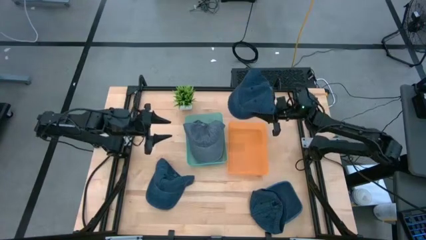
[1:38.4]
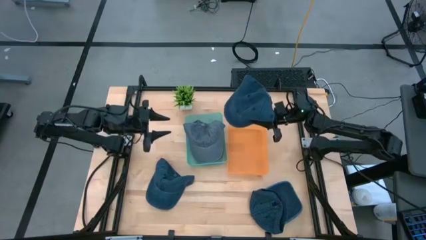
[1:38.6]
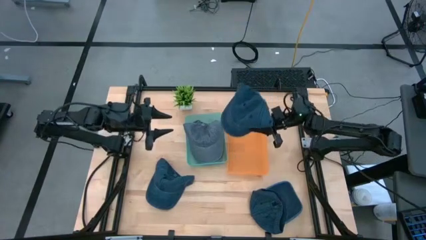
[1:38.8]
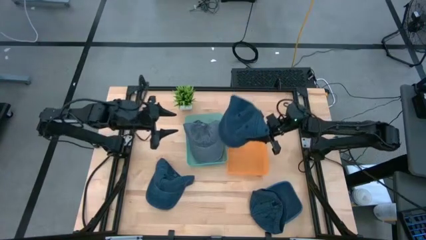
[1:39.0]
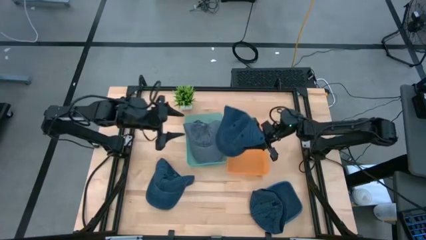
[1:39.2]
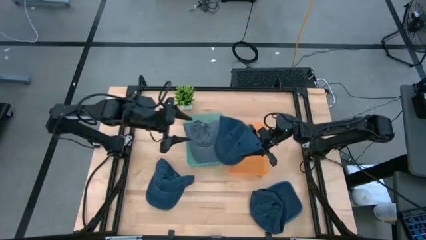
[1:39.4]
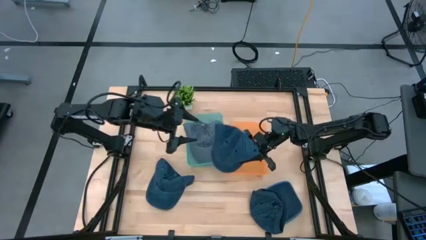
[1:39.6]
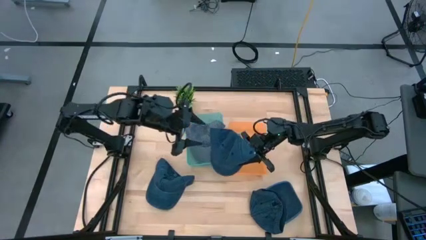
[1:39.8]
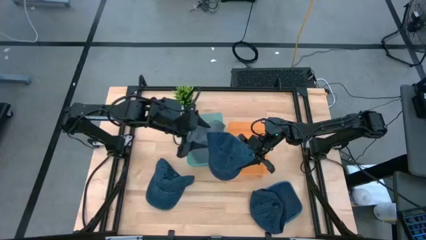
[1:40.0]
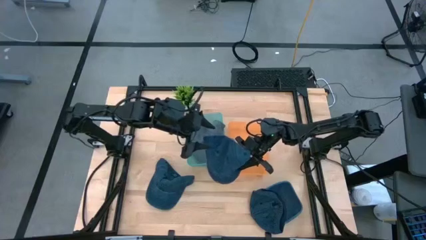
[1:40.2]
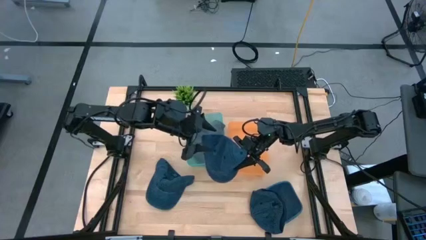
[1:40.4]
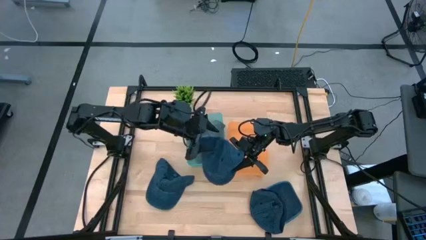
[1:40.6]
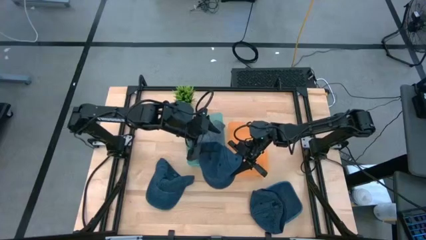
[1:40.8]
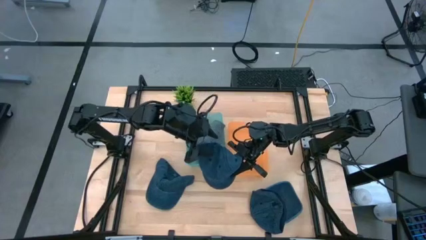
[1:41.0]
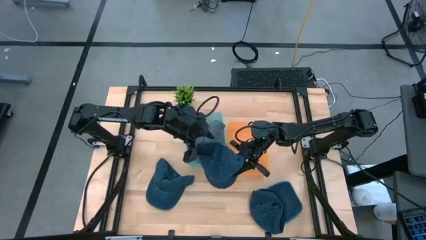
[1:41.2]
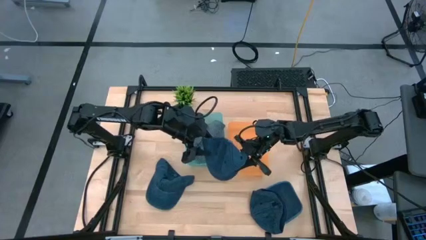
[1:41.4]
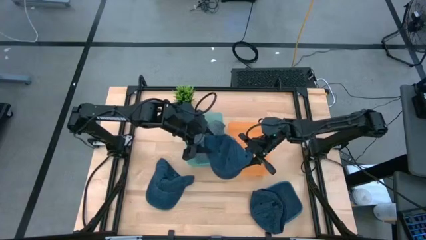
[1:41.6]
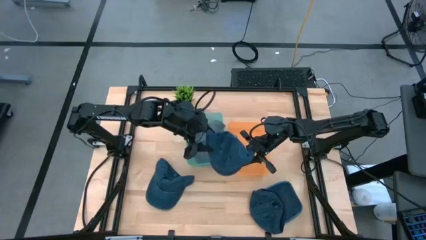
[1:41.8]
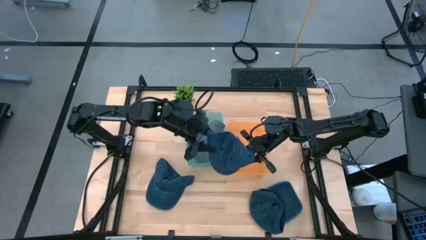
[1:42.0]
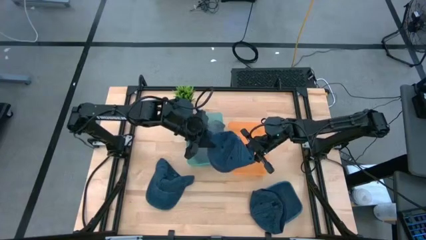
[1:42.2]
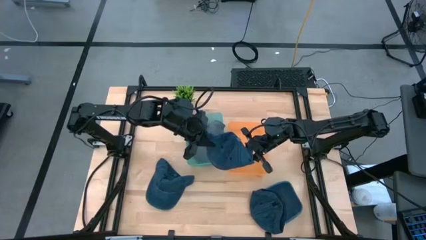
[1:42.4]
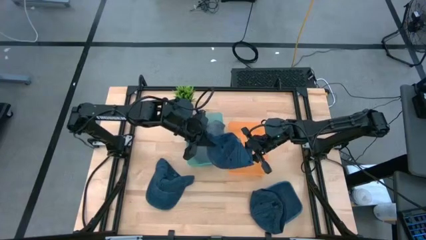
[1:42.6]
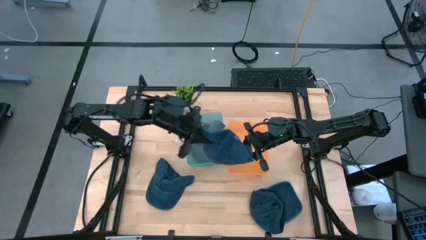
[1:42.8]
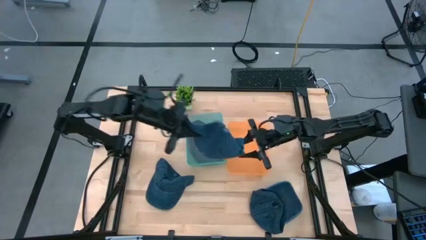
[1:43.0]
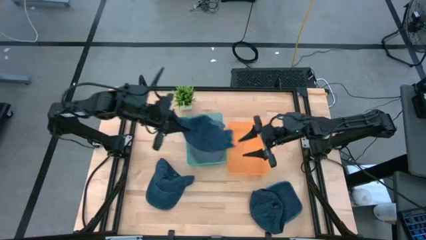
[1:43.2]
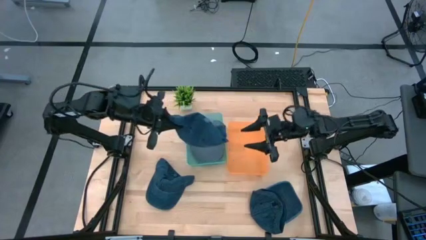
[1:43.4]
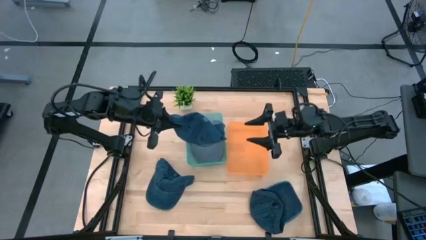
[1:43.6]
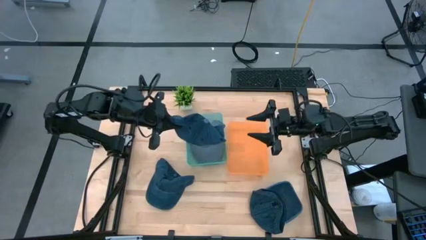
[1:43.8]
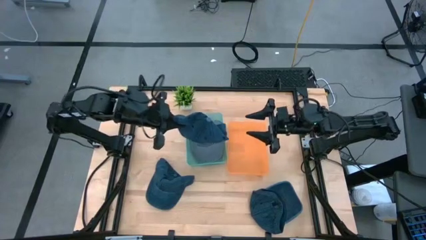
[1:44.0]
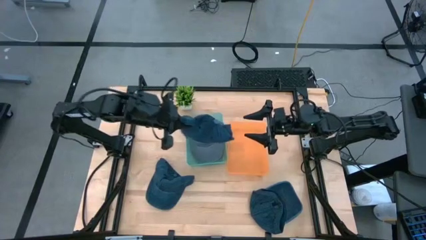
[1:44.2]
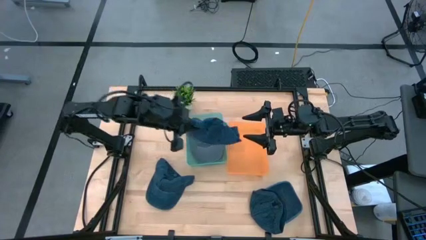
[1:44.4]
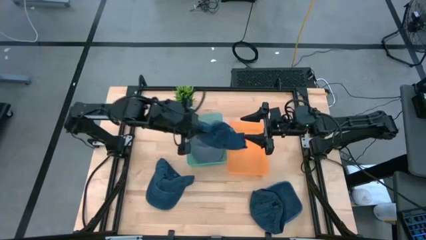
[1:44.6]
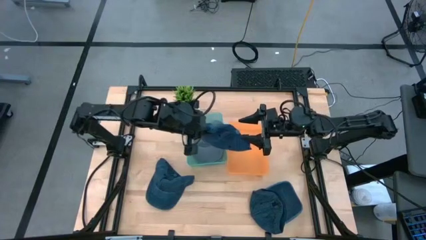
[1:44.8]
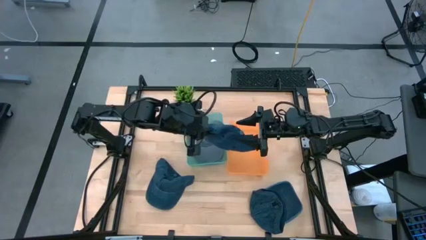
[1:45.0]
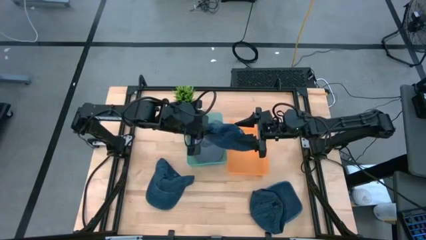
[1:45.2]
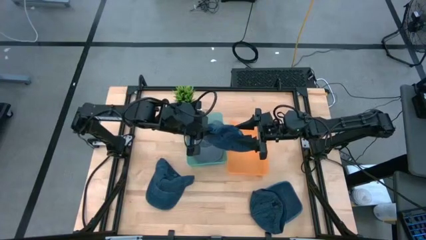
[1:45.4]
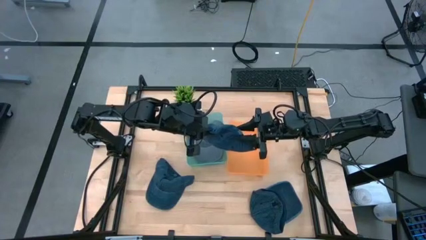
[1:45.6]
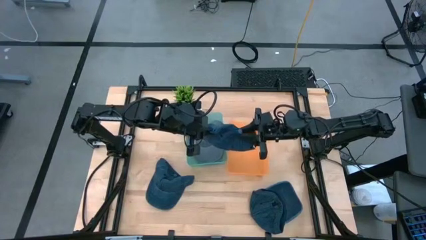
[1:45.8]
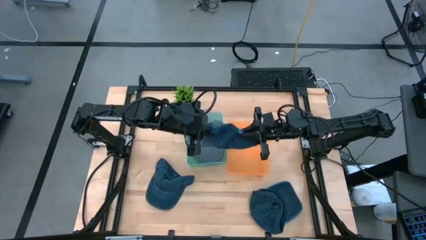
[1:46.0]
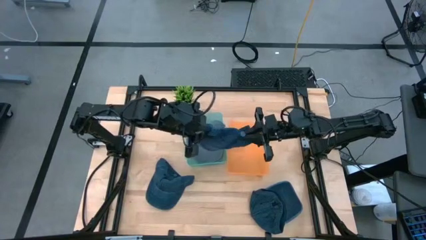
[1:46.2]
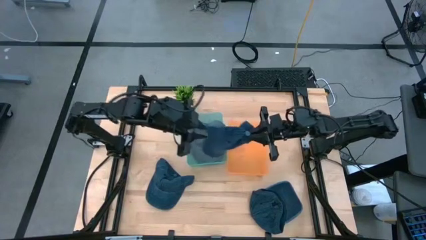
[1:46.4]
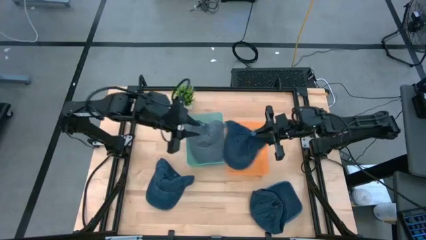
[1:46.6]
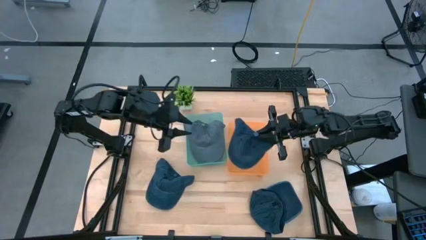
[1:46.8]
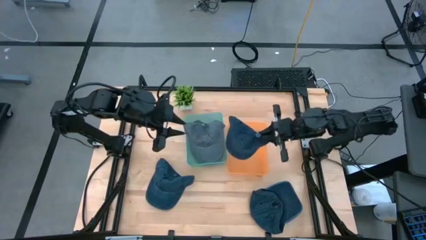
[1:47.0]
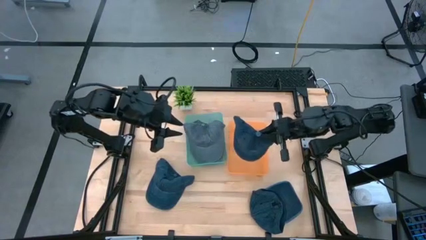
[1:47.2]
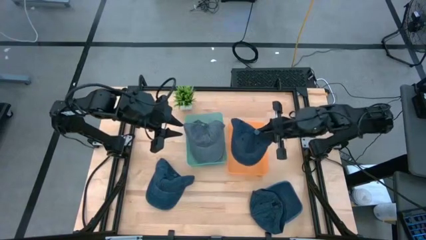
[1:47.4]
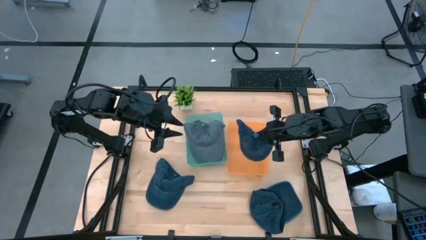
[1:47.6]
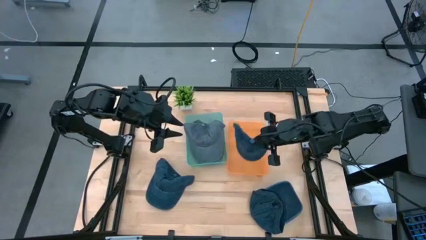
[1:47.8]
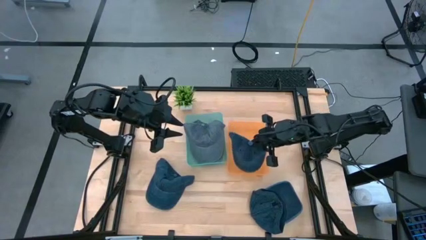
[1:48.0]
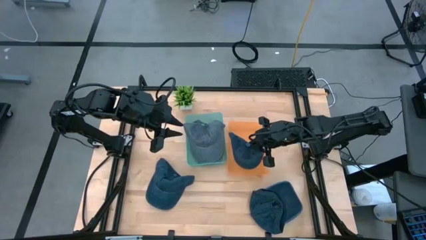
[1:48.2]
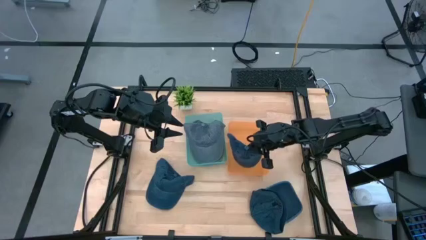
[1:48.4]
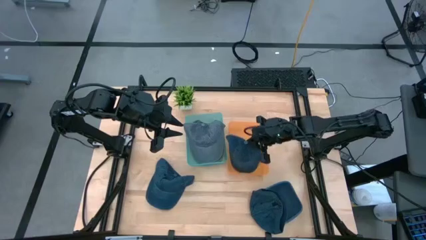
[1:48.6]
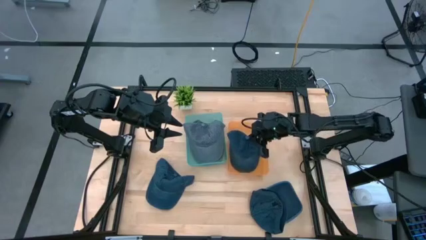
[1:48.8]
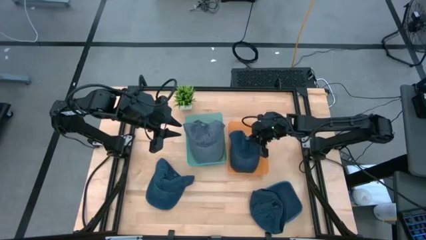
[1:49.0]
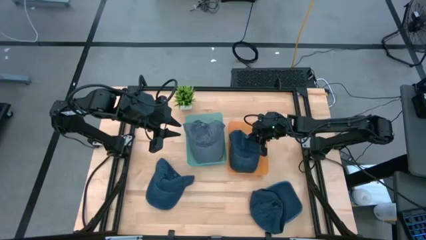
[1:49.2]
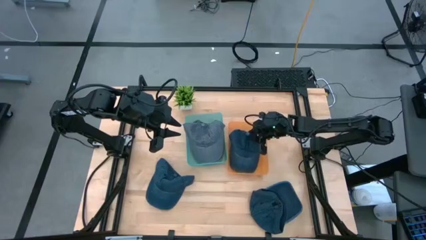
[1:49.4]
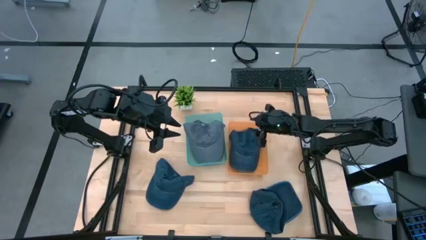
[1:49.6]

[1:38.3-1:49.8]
Task: Pick & Place hat
Put the top right blue cap into the orange bin

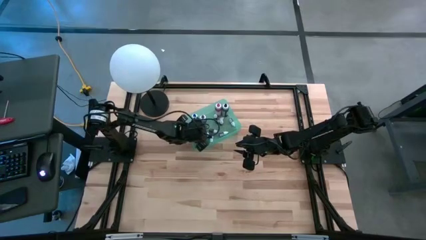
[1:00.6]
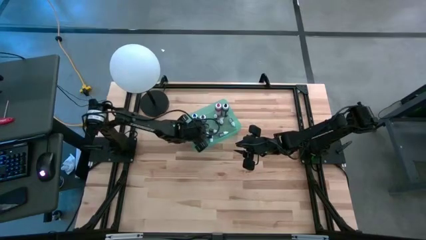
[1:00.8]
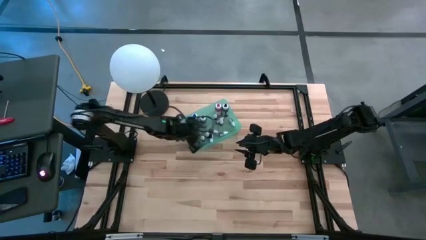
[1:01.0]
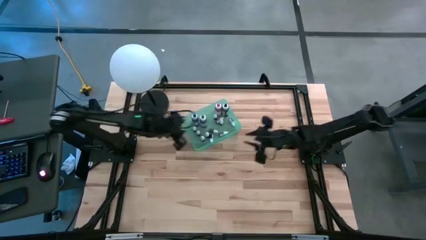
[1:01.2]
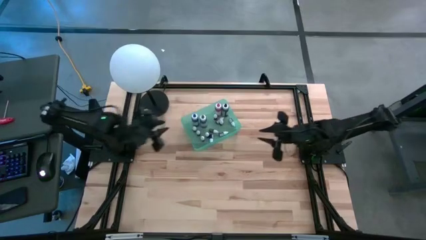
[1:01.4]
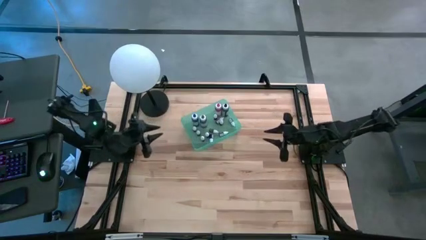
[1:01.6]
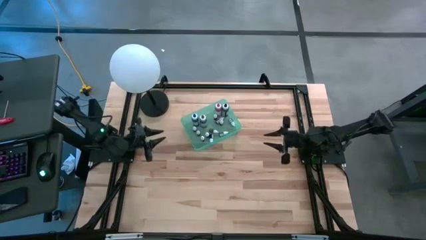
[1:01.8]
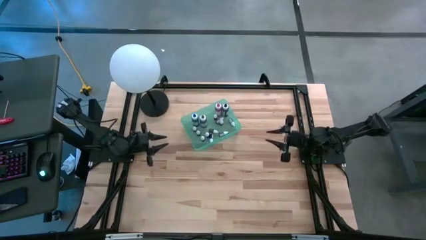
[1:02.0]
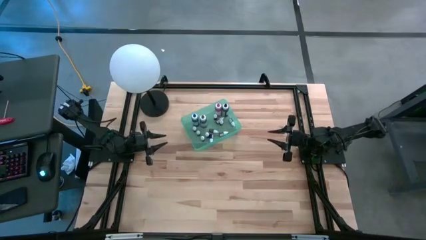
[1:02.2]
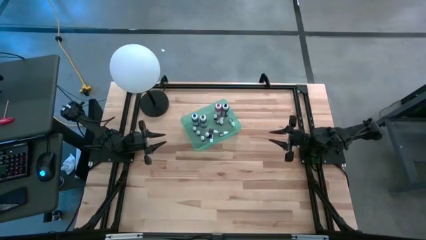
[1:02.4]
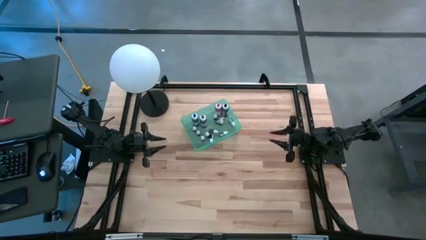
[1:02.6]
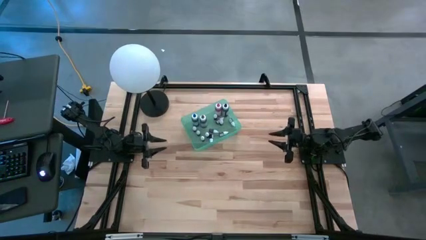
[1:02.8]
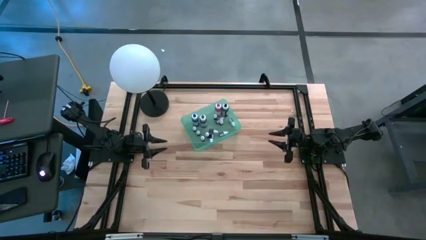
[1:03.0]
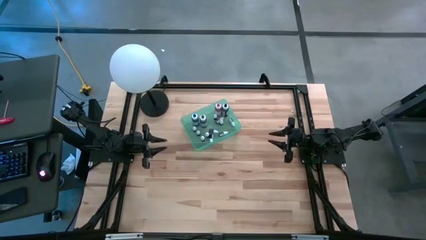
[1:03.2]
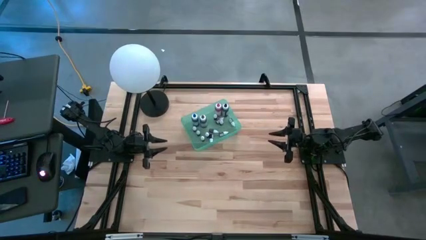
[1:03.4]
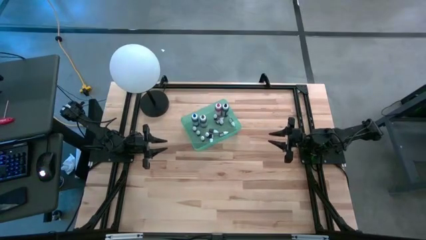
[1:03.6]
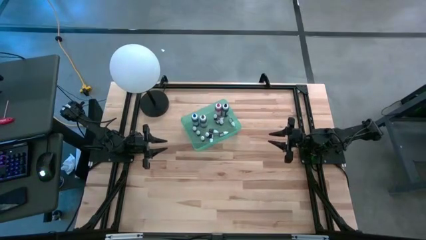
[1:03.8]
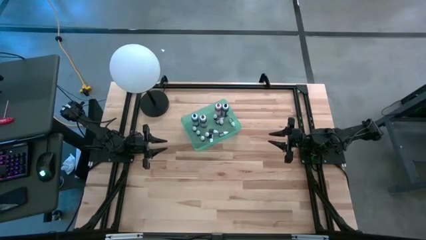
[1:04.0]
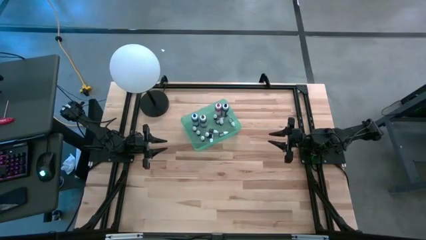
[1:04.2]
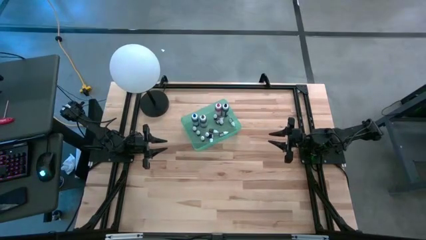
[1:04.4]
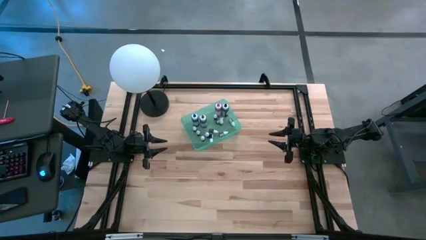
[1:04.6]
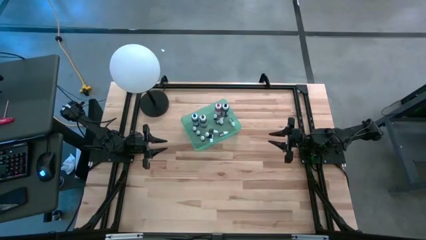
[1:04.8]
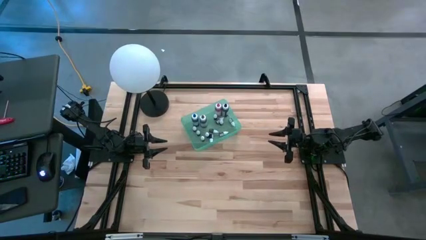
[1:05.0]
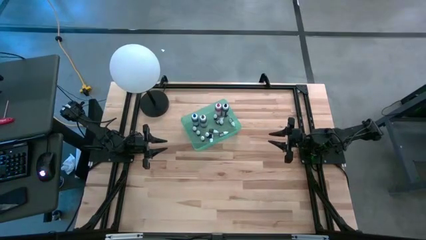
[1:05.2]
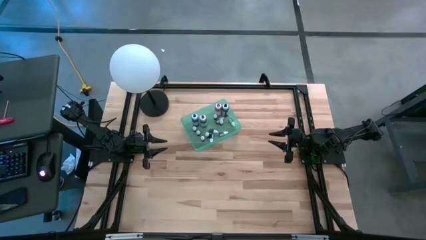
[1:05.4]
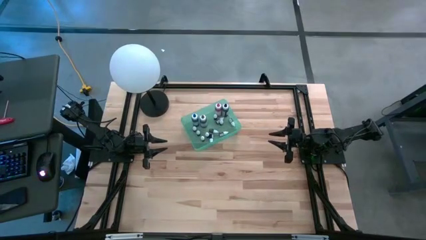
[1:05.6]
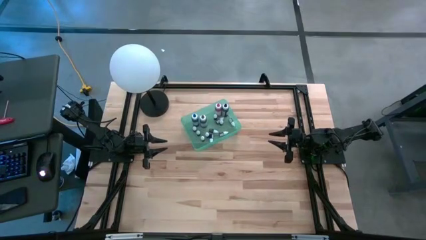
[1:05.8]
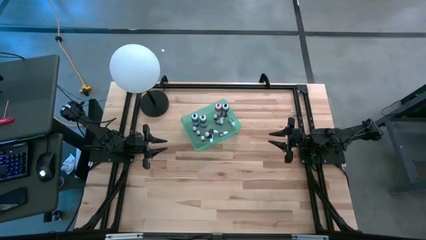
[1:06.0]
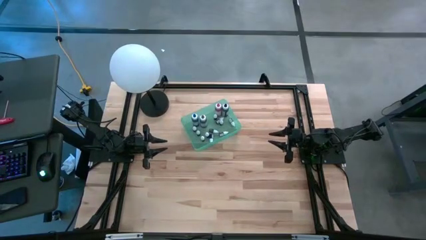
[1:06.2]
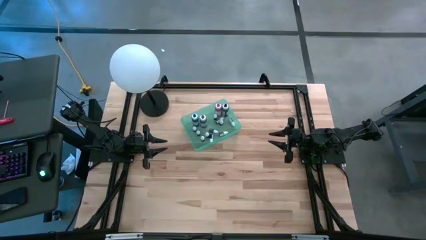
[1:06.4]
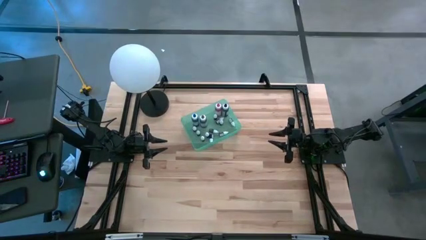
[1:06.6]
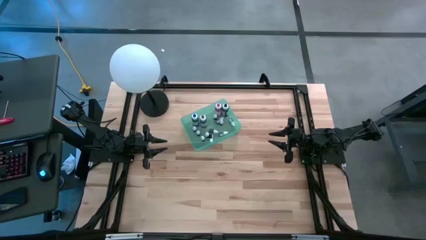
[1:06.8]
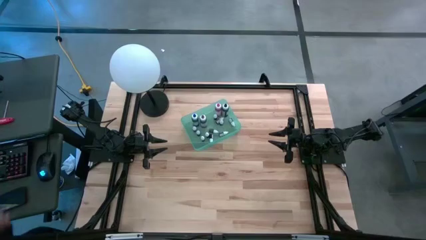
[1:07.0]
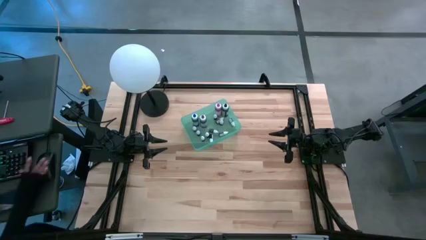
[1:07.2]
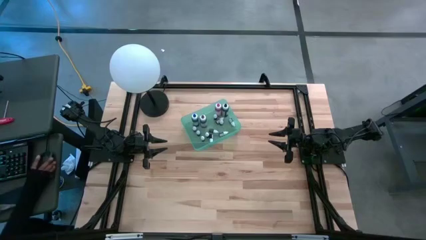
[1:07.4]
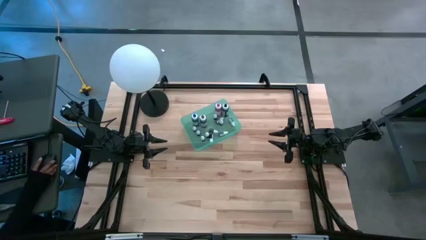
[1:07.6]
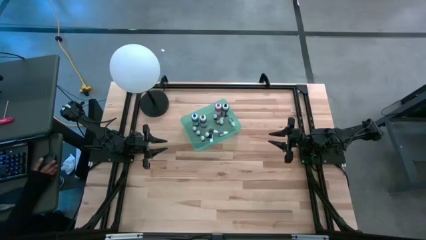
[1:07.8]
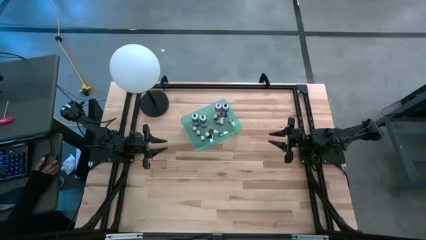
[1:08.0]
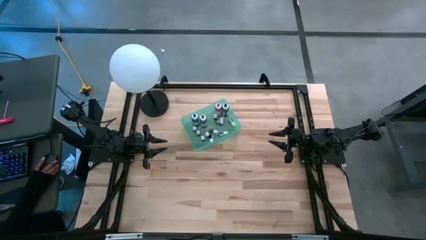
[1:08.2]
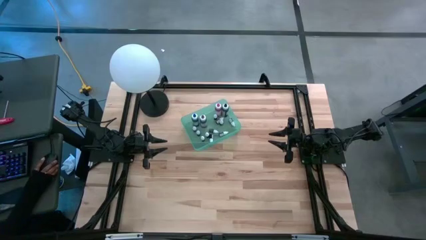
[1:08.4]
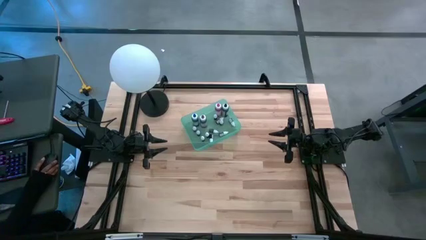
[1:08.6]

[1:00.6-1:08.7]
Task: Pick & Place food coloring
Return to Home Position
